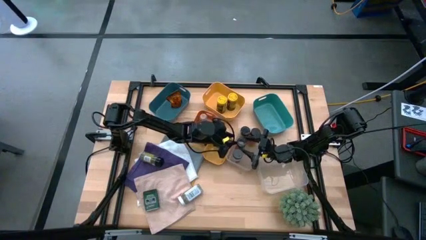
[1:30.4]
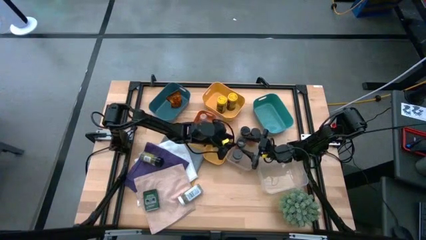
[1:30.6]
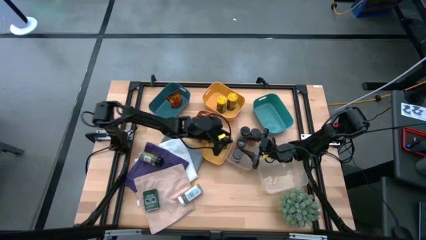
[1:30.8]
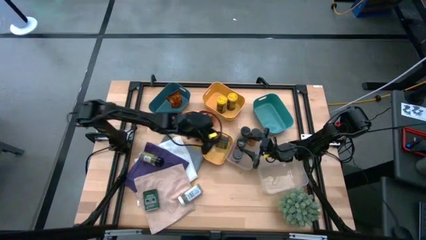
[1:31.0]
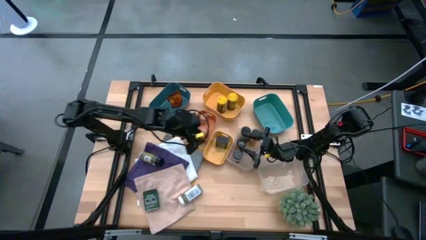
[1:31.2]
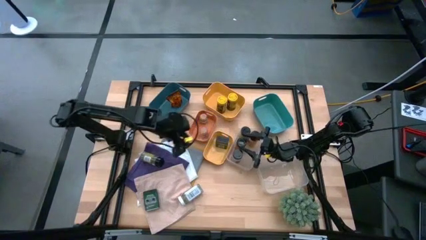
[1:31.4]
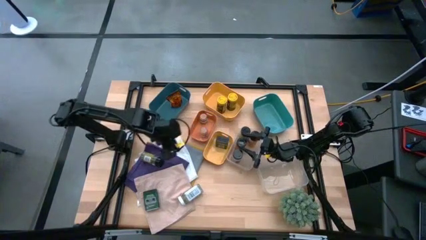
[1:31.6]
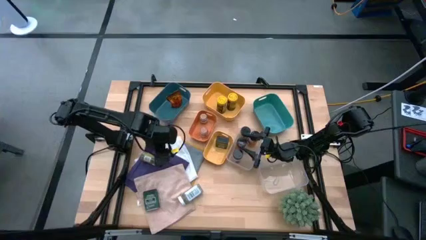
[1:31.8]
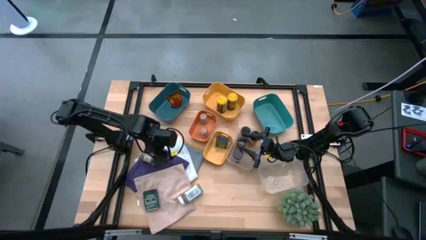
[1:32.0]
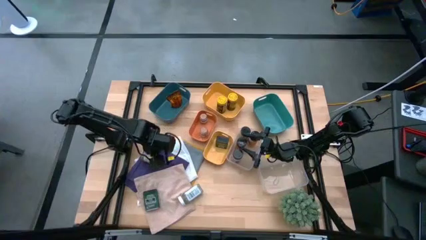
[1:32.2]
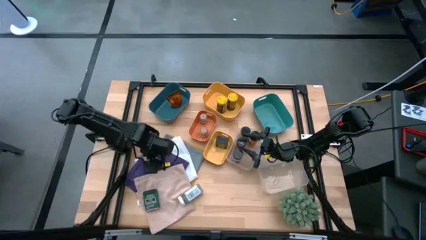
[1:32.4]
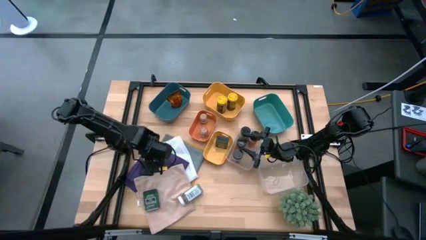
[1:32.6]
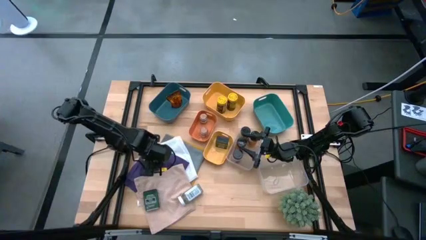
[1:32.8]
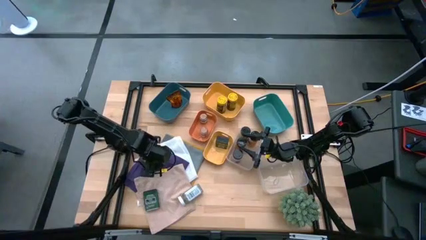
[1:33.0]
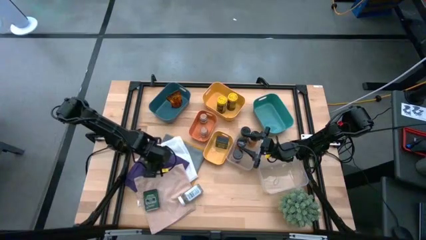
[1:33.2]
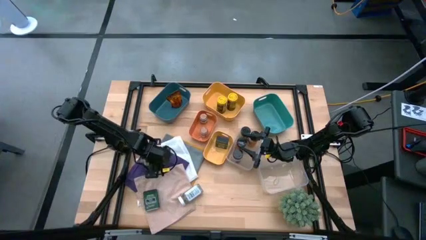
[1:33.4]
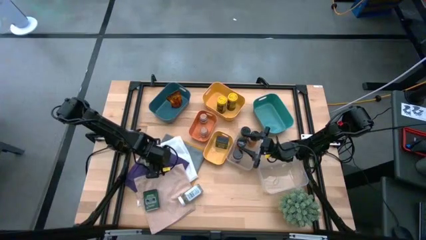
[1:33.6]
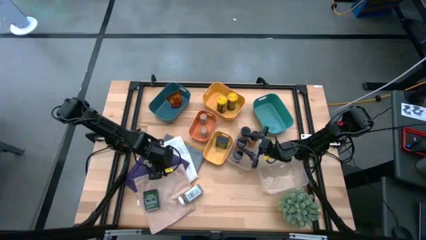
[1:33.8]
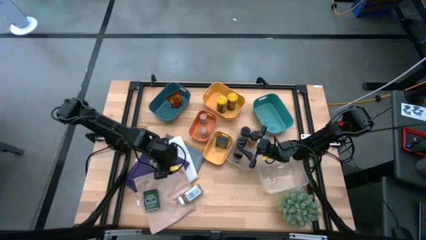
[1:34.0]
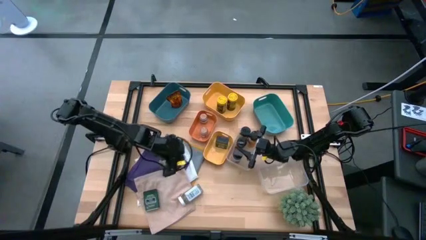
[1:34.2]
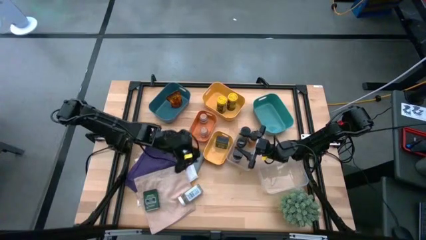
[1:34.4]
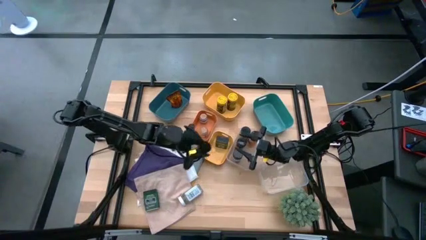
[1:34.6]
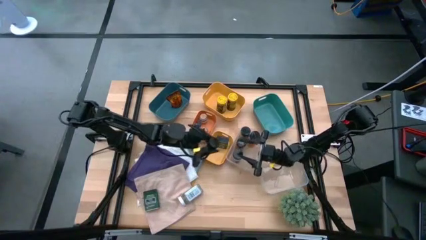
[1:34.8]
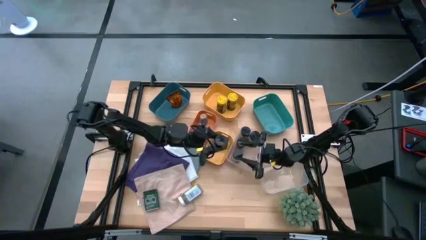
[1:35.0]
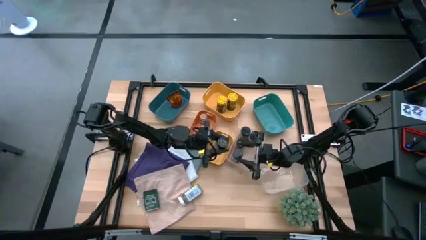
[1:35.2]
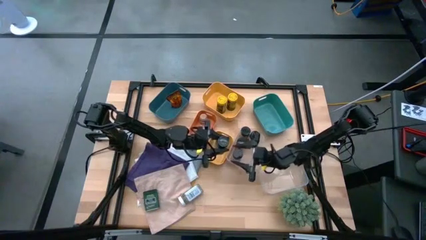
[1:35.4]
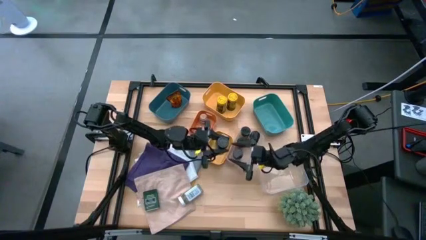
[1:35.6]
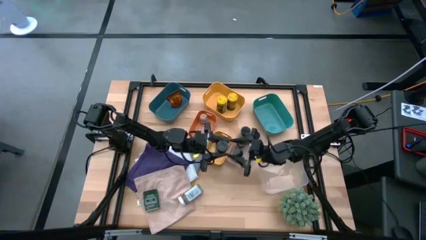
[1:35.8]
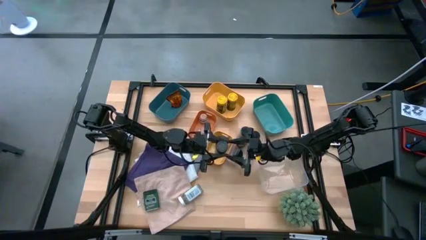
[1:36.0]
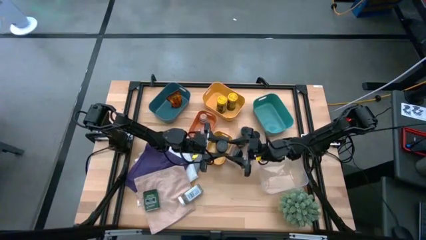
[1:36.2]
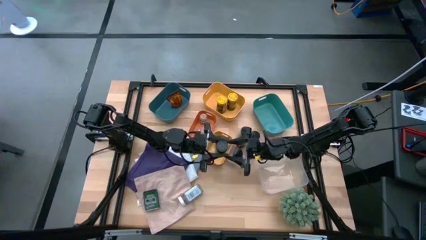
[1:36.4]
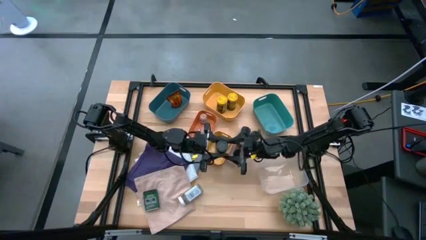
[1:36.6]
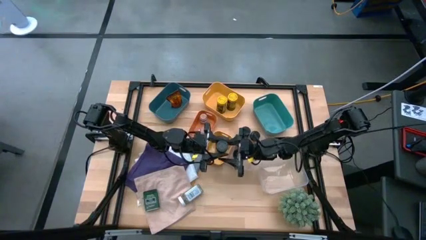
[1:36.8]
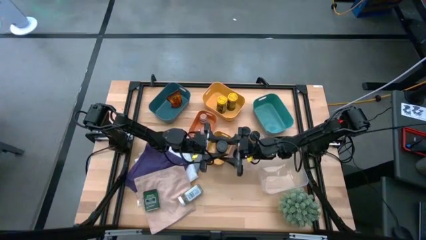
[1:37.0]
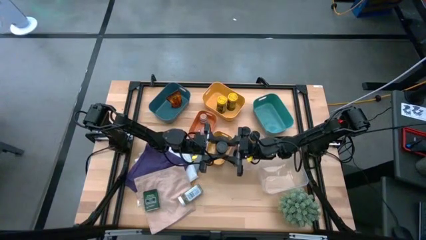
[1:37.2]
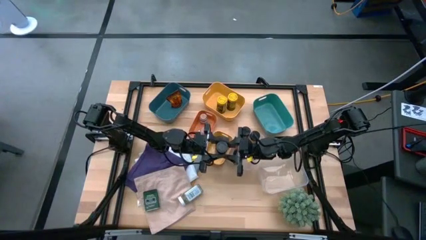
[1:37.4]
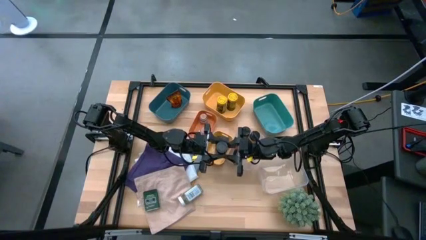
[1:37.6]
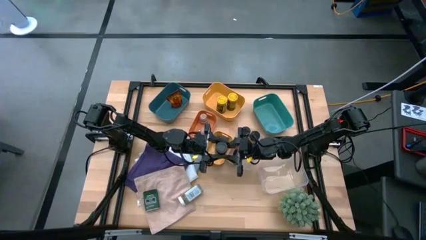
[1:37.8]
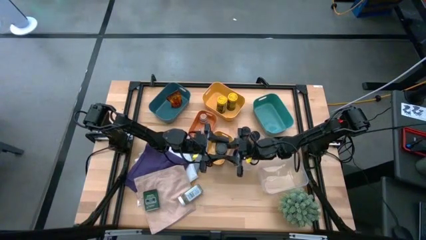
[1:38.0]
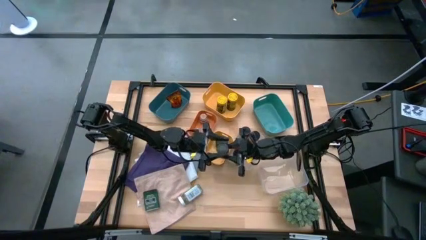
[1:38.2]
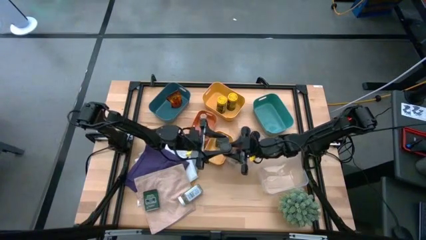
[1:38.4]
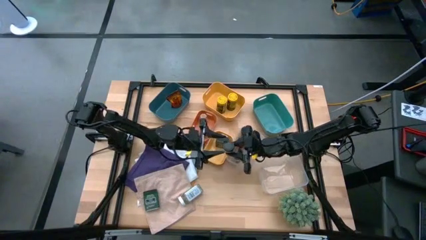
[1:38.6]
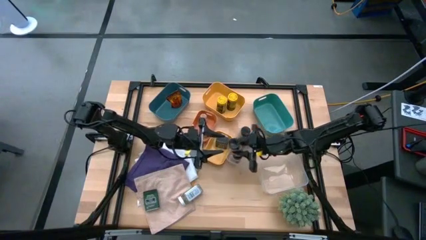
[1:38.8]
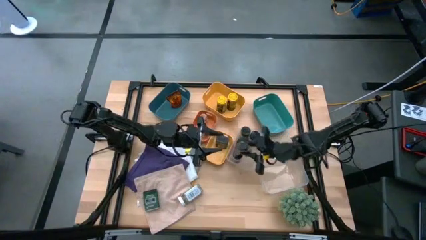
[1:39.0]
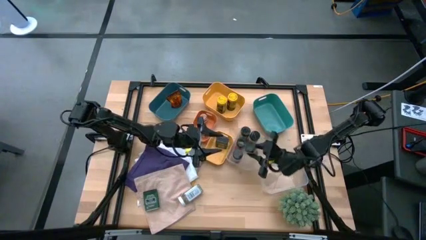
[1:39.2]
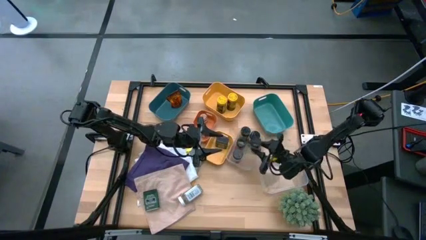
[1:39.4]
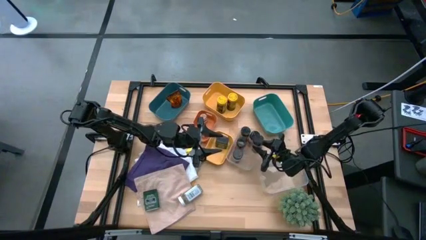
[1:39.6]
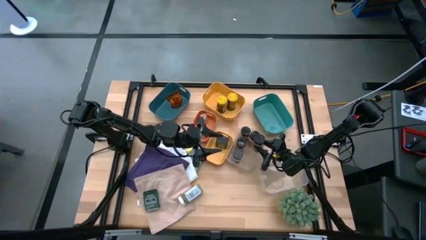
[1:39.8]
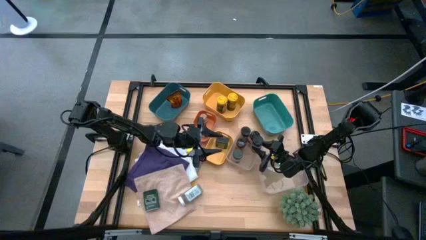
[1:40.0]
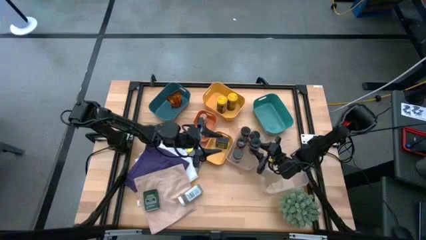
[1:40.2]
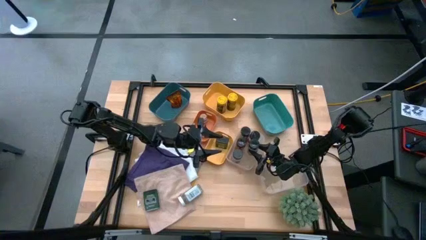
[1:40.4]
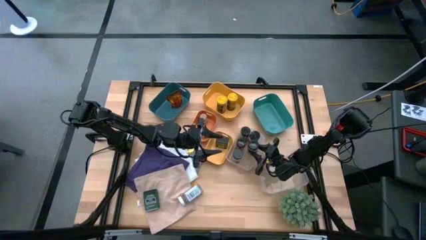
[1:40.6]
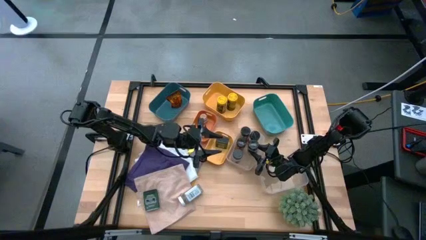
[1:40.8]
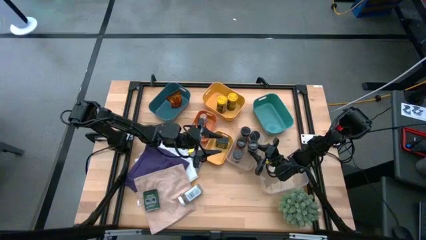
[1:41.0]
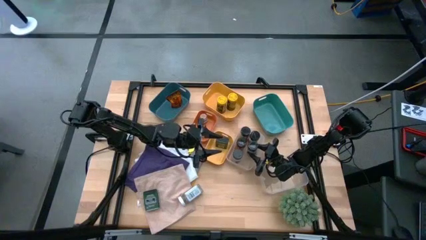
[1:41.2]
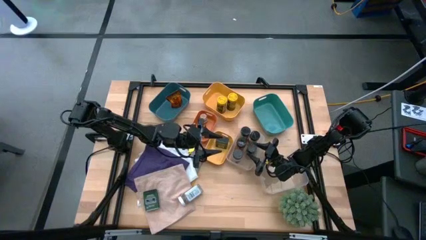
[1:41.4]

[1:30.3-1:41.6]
Task: Sort spices by type
Put the black seasoning bottle into the left white bin

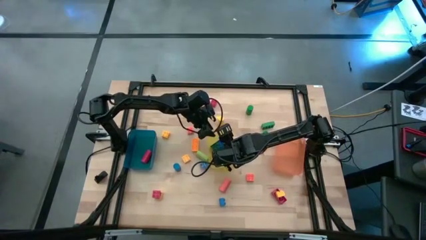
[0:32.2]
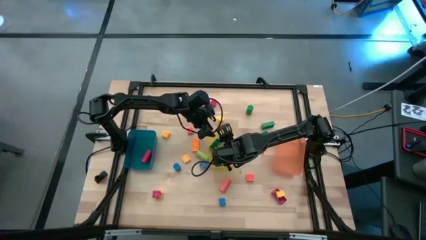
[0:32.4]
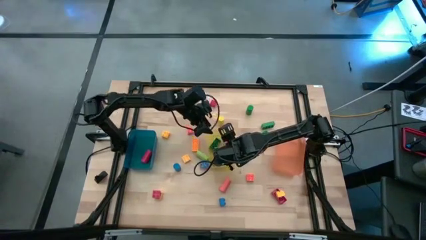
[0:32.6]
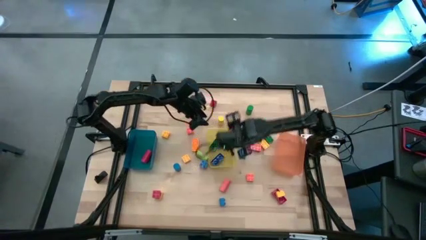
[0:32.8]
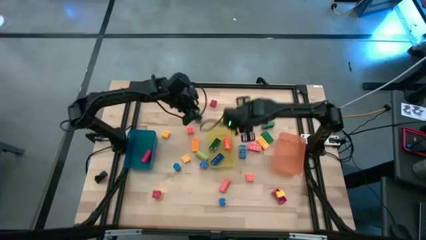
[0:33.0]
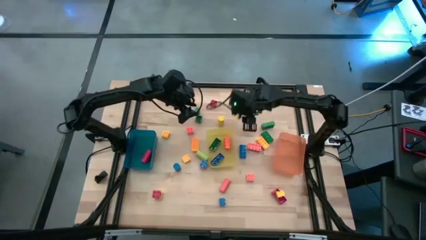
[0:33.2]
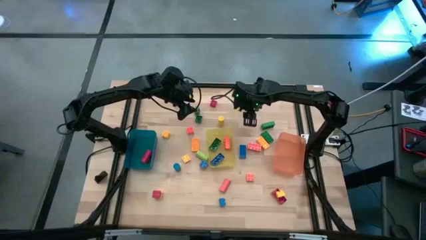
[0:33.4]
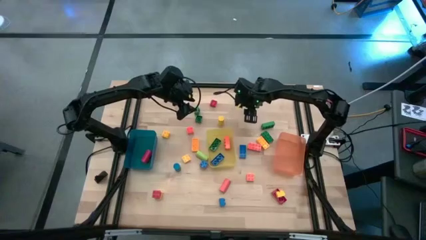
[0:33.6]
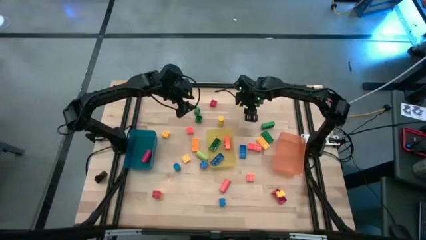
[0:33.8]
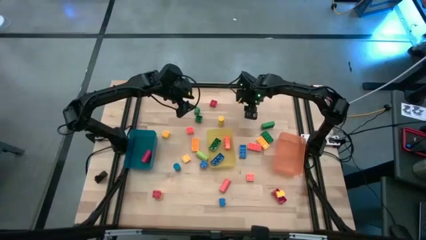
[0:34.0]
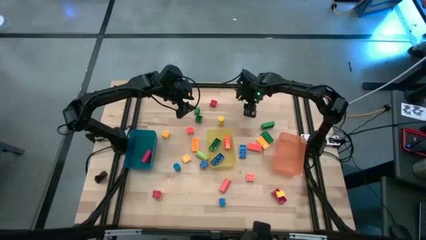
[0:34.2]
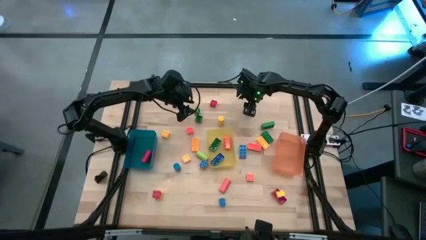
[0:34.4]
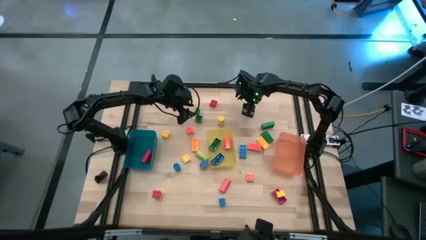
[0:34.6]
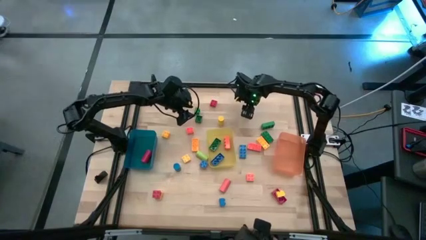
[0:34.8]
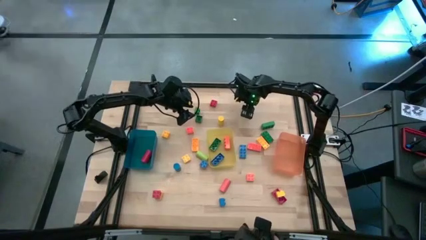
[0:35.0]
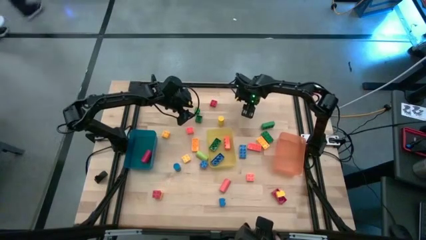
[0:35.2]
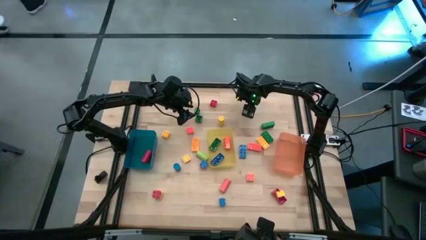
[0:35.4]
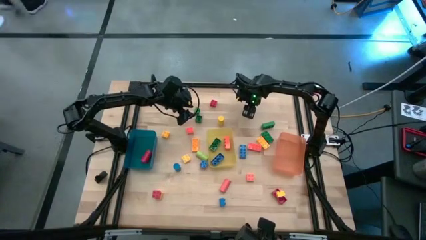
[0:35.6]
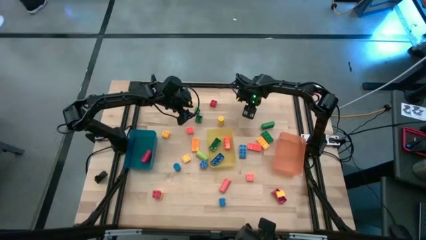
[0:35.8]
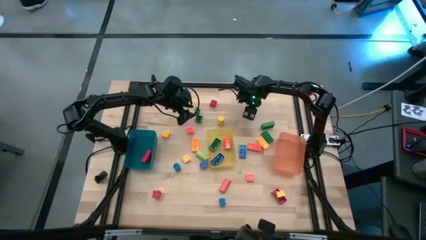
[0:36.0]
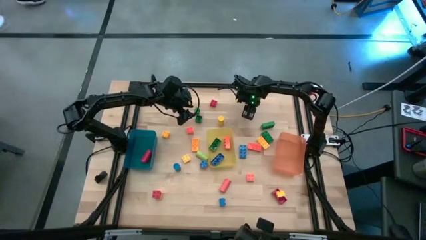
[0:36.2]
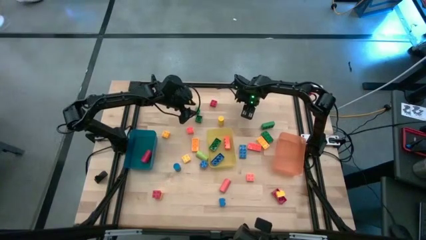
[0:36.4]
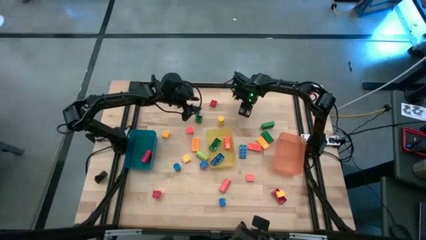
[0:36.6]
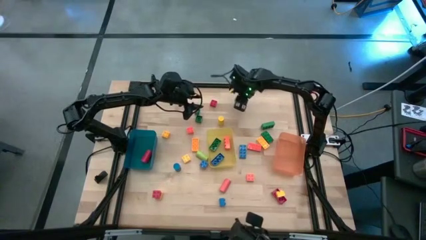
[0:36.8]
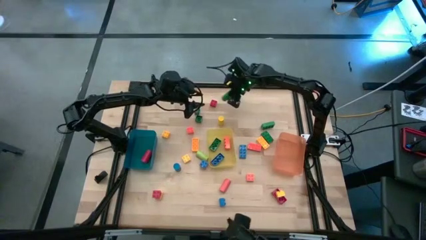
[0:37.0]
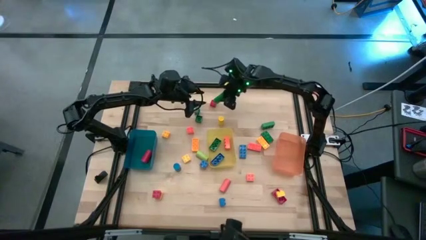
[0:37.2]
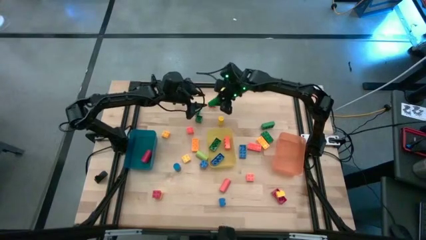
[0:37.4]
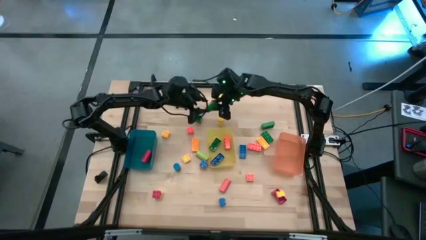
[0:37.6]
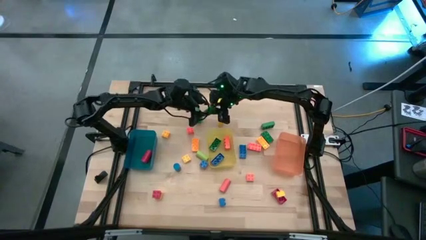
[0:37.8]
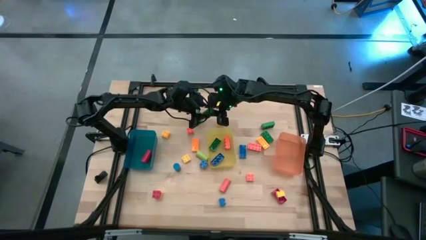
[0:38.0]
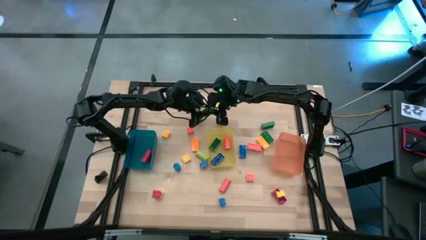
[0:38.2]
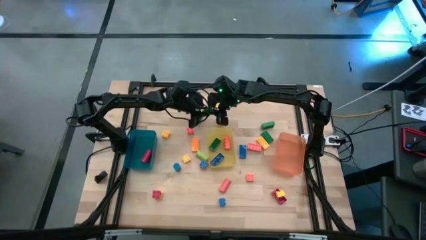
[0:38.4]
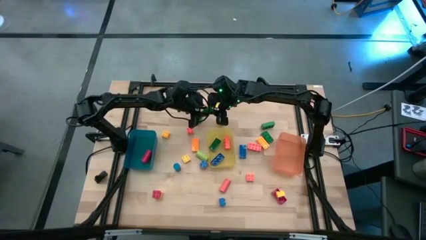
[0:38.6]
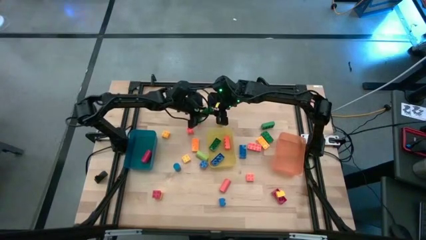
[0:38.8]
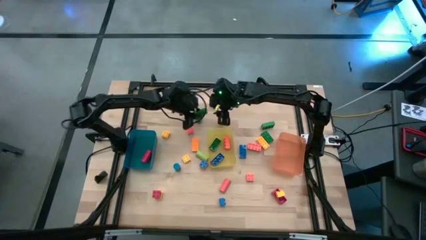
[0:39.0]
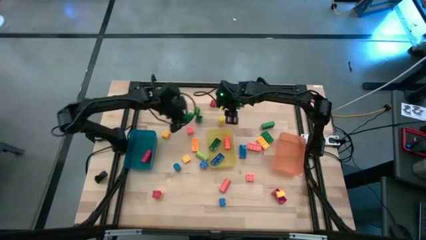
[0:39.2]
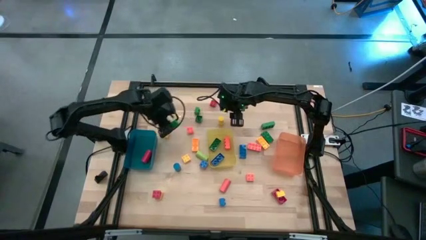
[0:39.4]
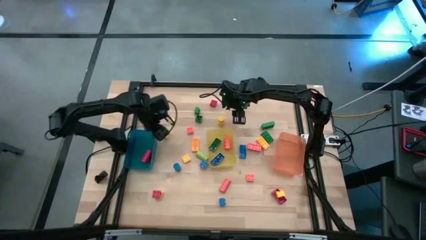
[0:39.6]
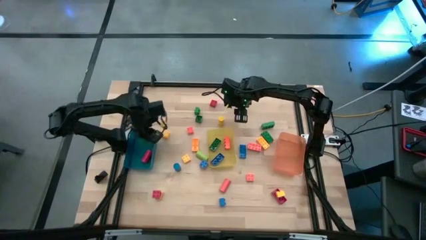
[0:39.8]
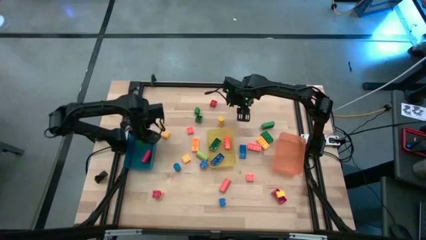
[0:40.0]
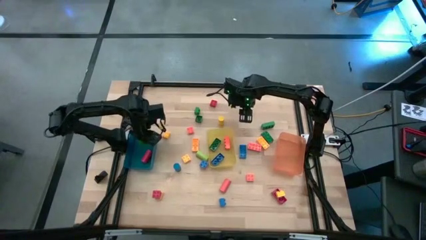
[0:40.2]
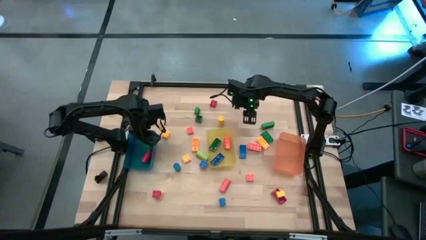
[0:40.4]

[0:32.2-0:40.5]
Task: Sort blocks by size
Put the green cylindrical block into the blue bin
